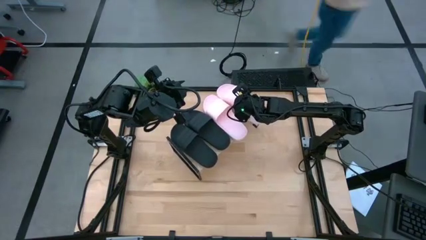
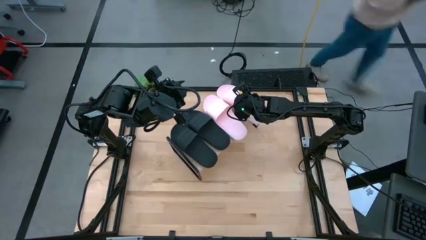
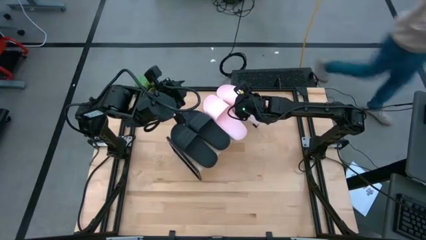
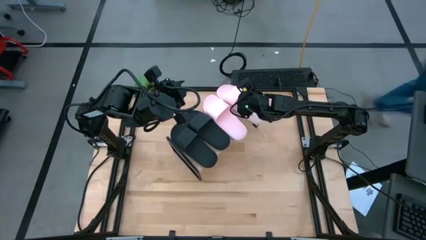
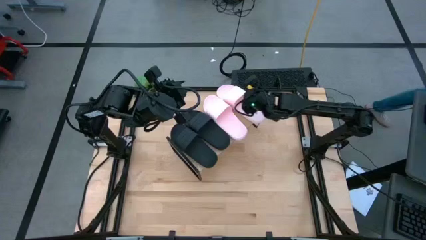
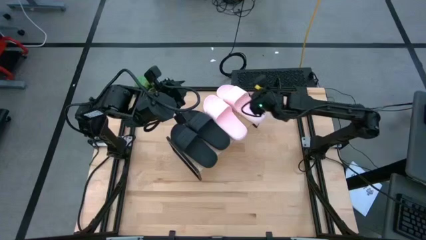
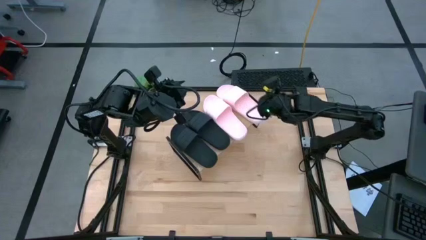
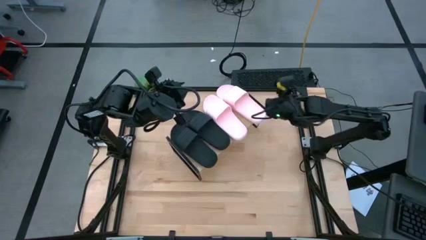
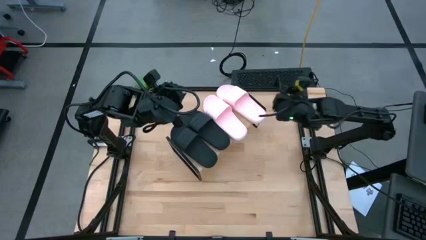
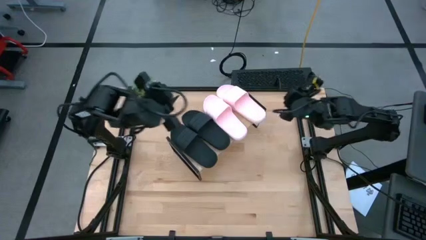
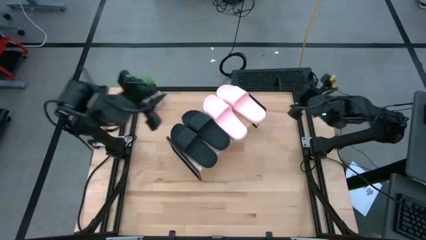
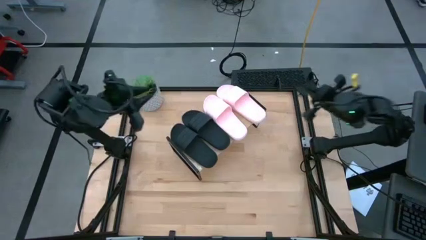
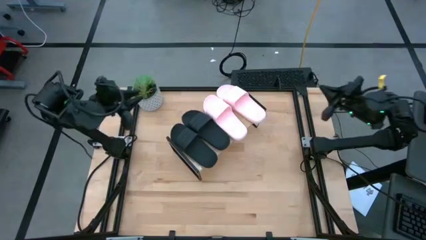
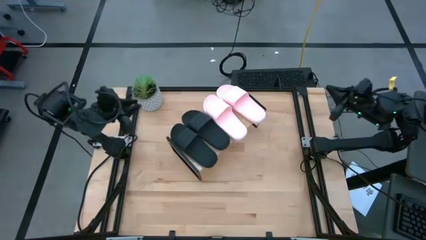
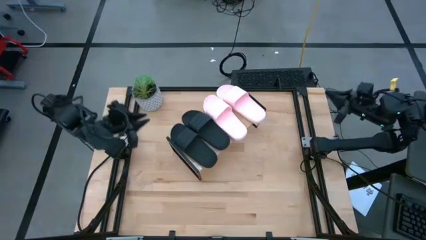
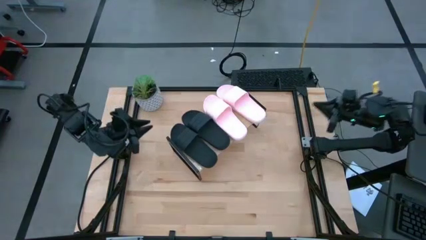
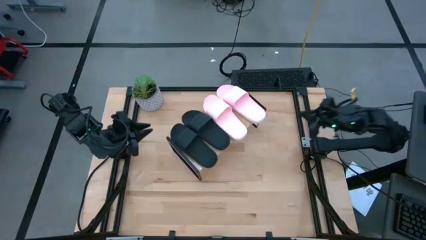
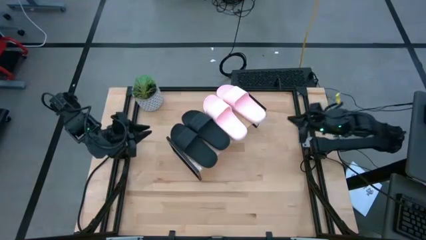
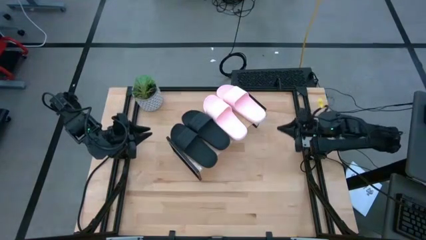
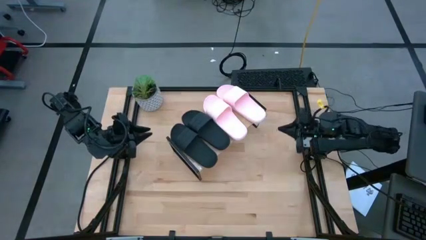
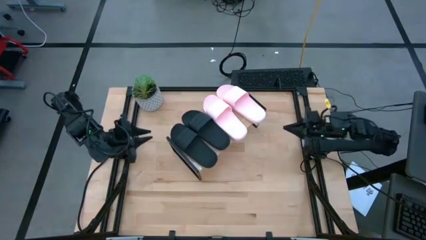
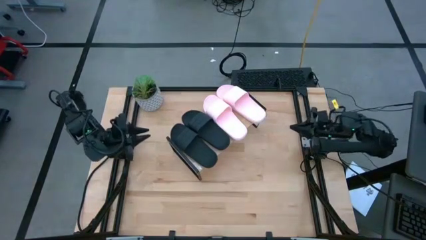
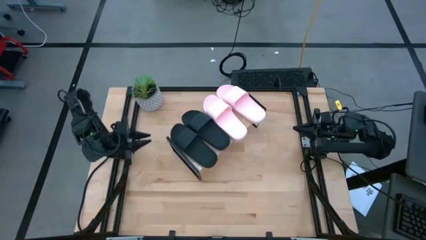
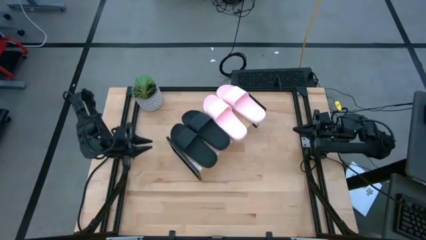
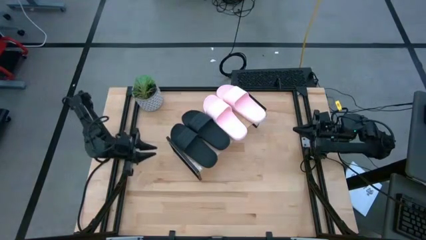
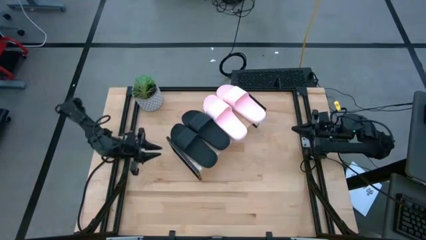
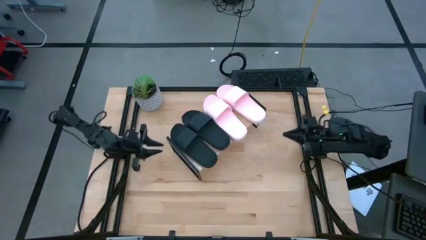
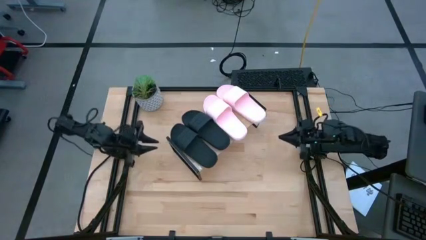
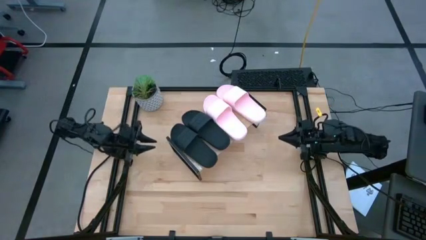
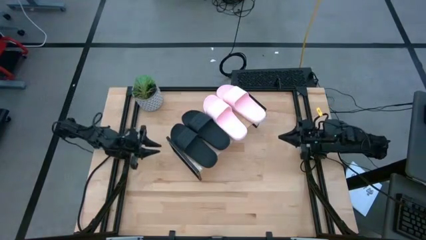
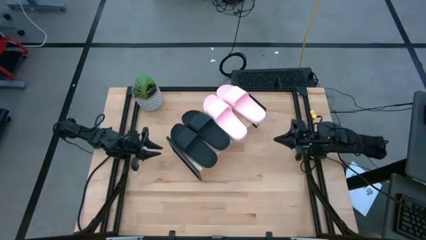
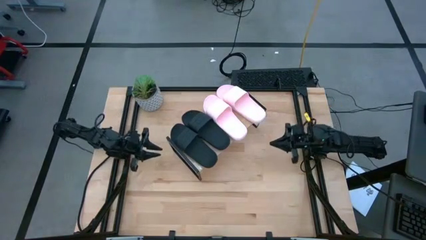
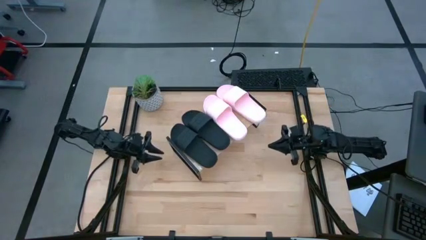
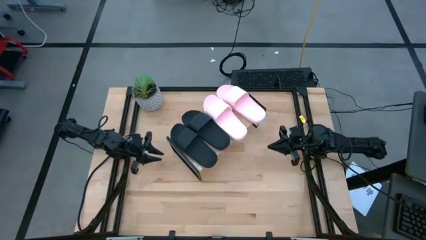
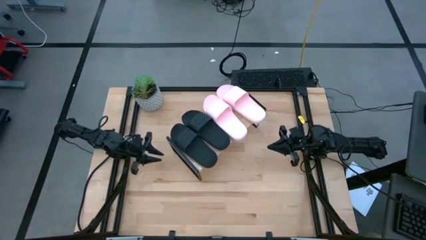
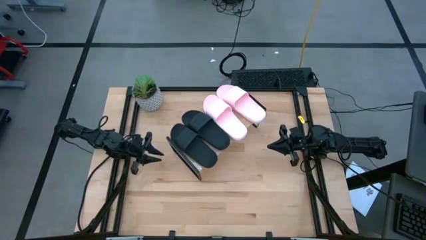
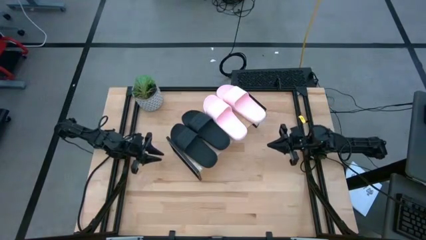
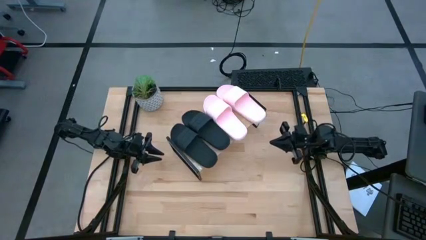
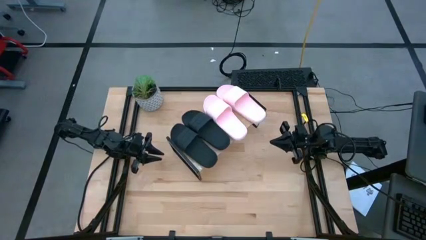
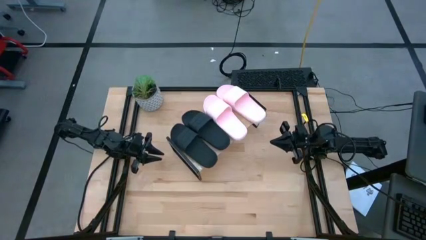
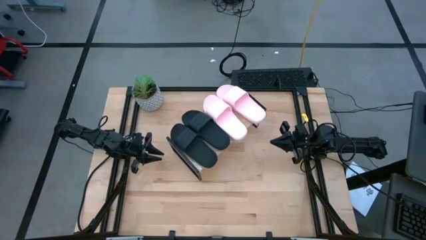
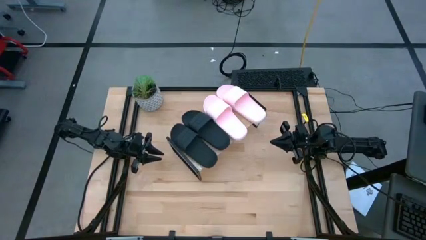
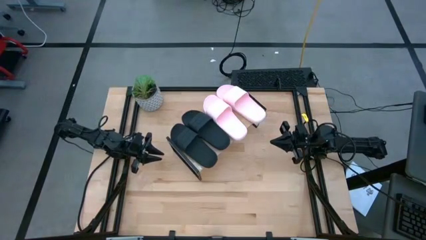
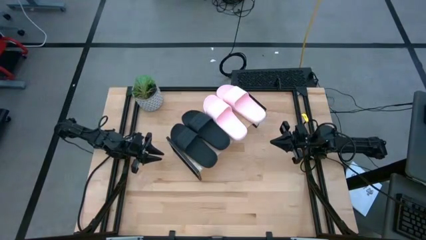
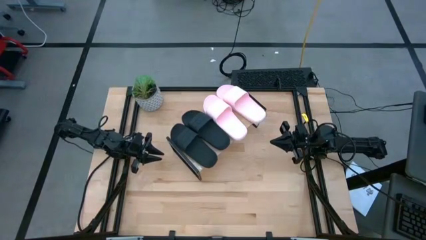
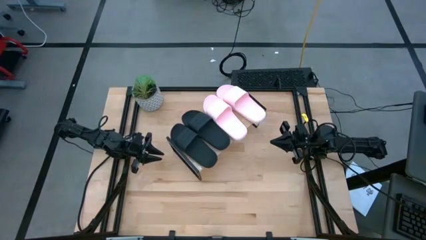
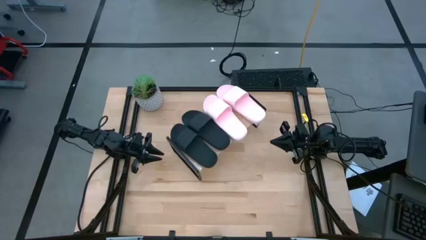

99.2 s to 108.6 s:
Task: Pick and place slides into the shelf
Return to Home Position

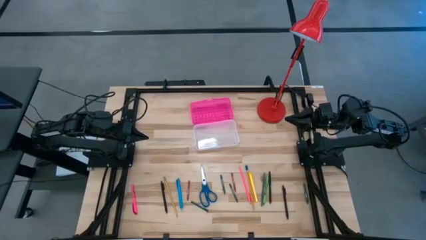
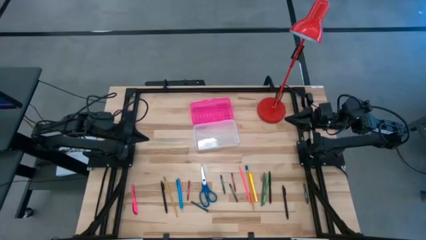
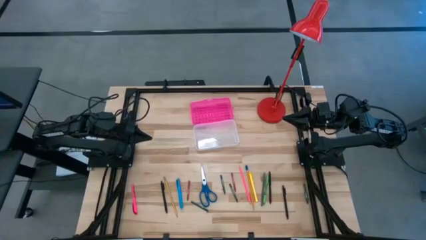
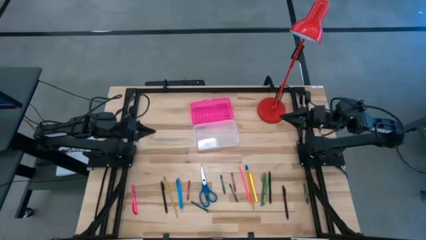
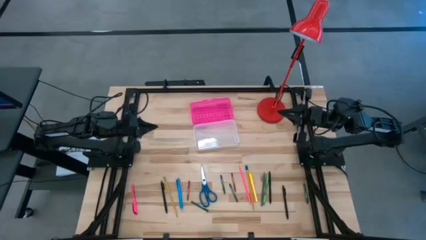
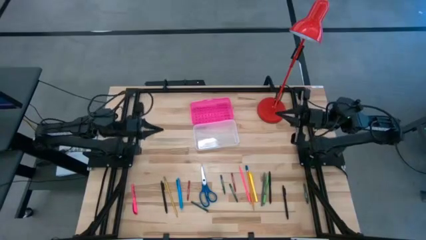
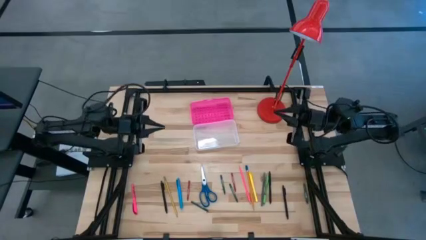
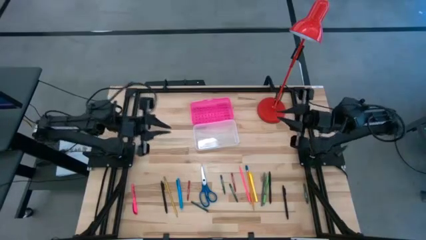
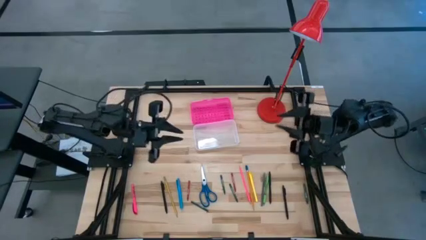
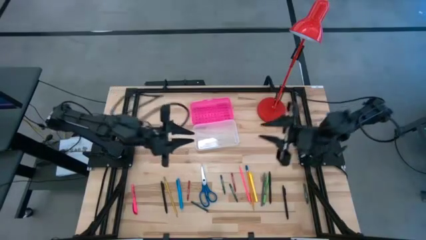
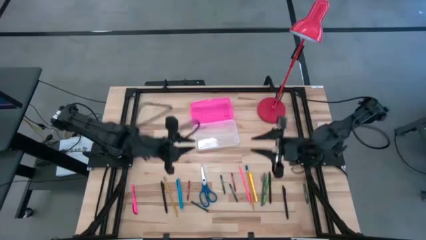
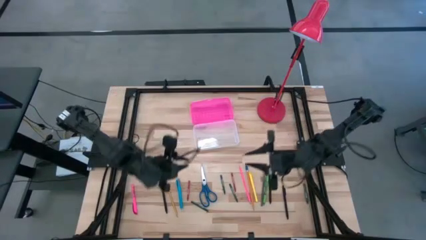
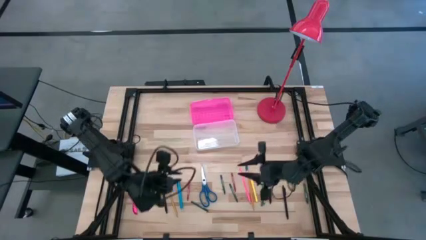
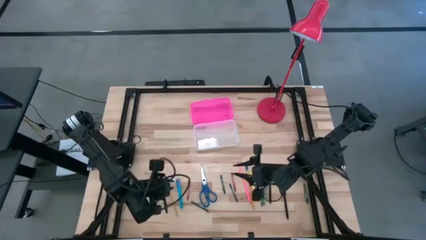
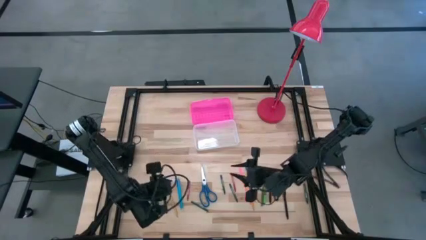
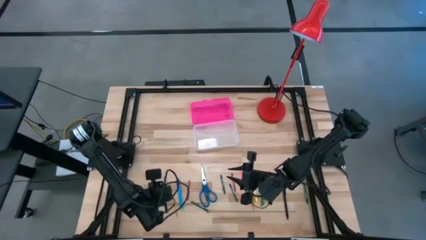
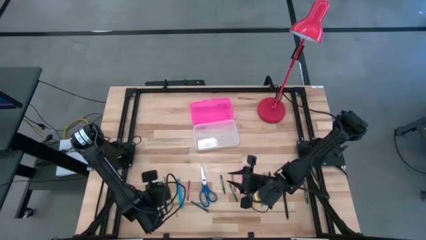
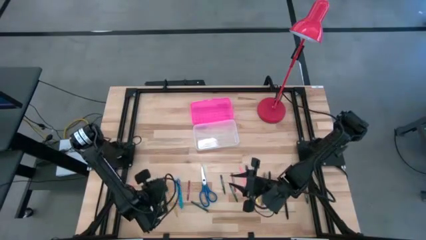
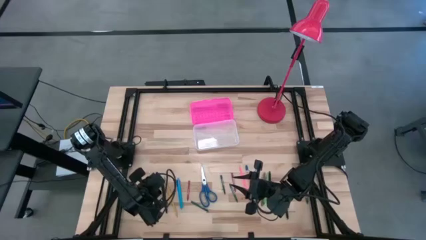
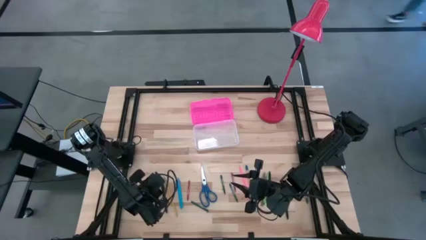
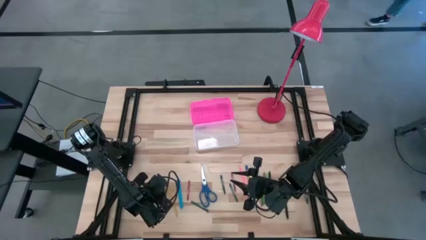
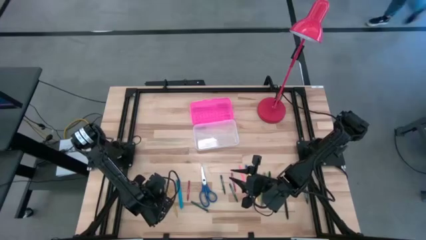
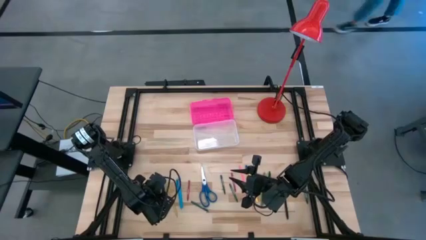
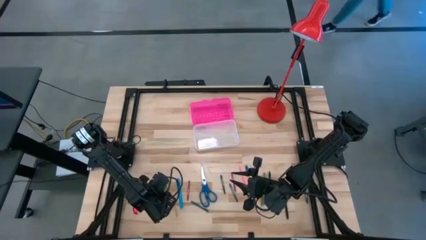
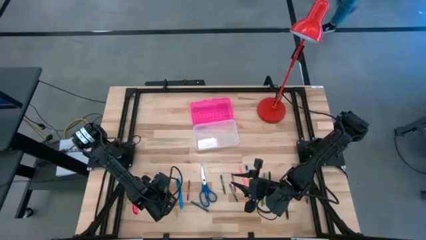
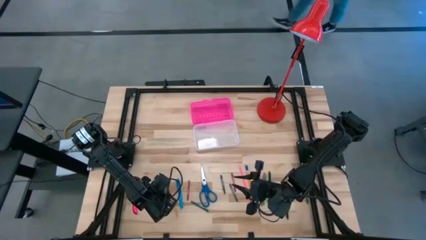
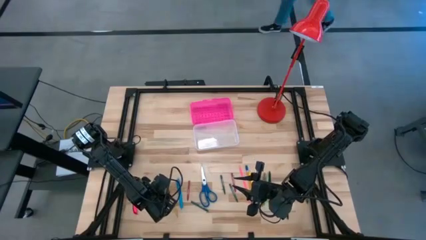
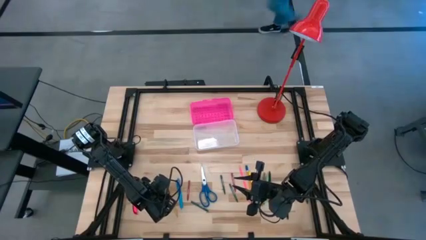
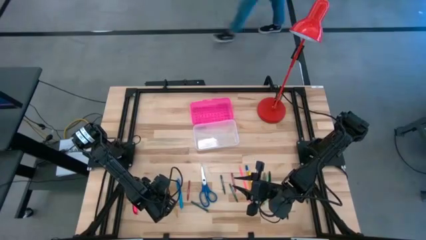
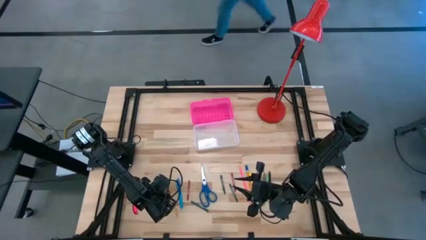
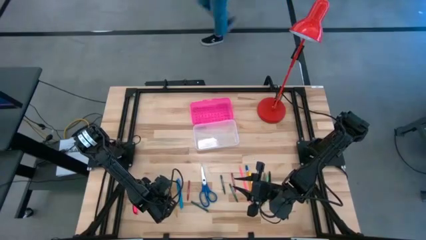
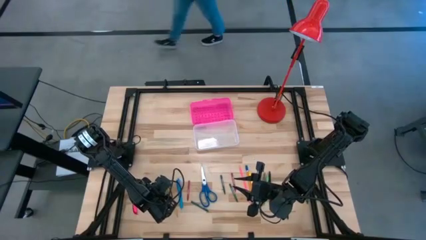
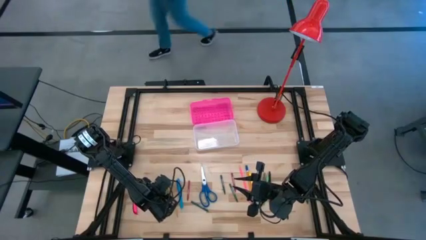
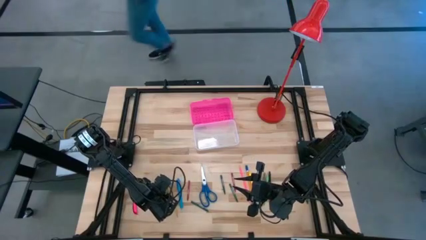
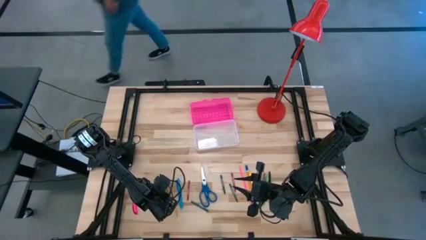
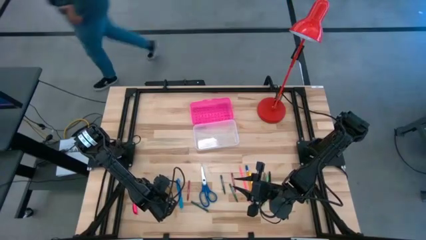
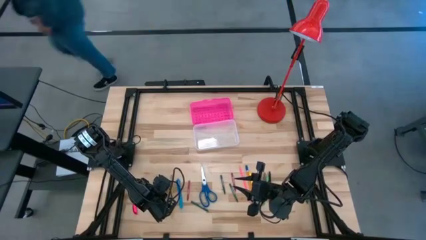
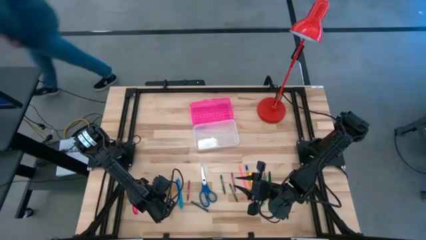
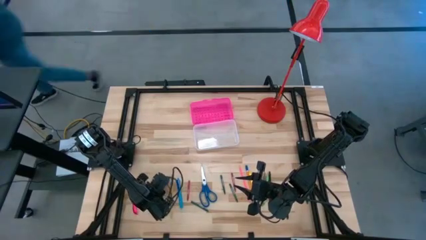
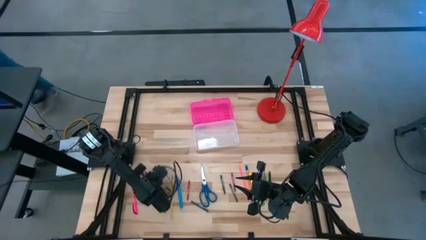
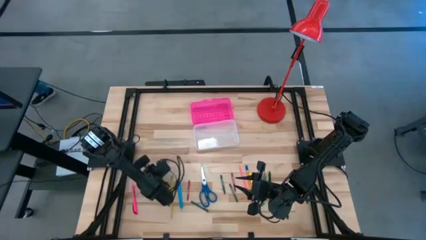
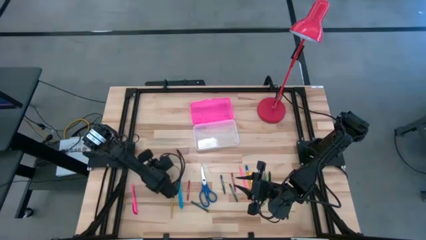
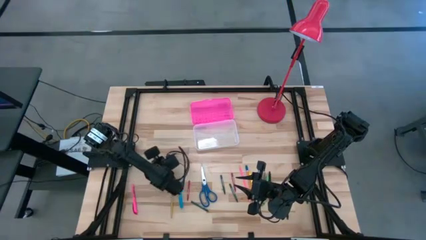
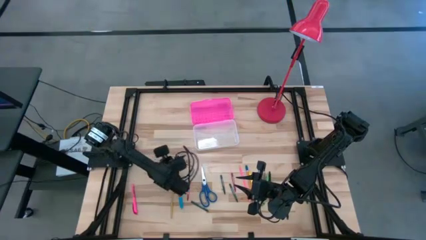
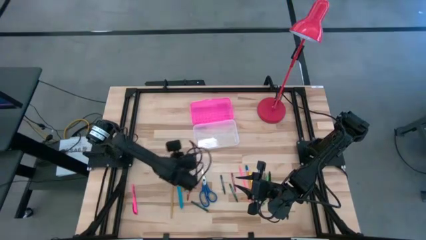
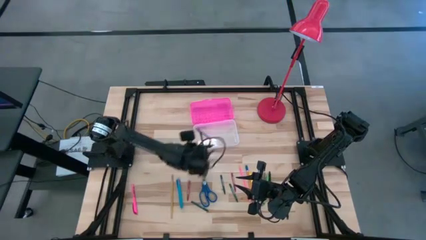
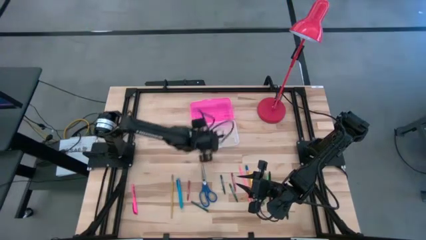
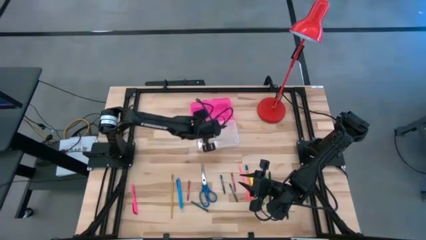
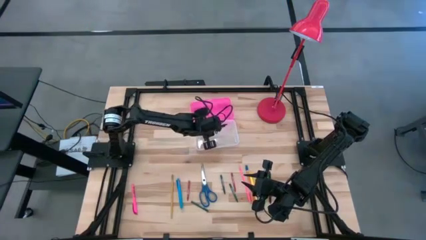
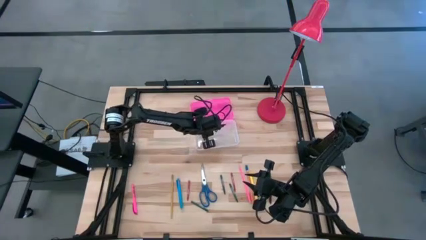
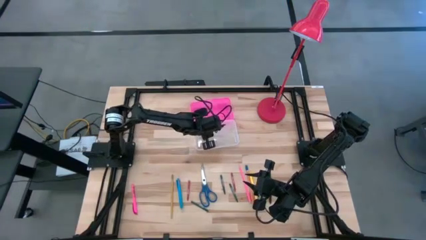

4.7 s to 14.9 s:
Task: Pick & place school supplies into a supply box
Put the black pen into the pink supply box
